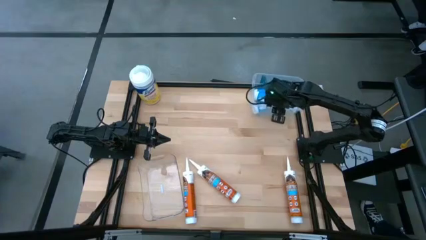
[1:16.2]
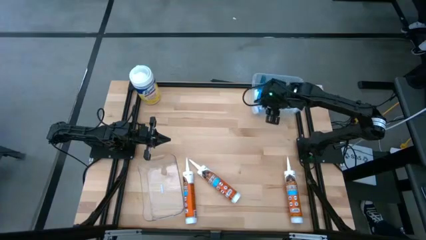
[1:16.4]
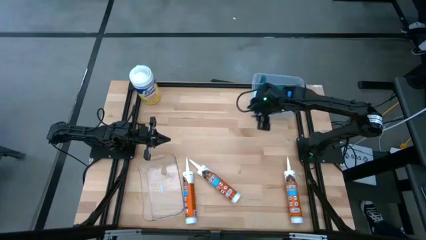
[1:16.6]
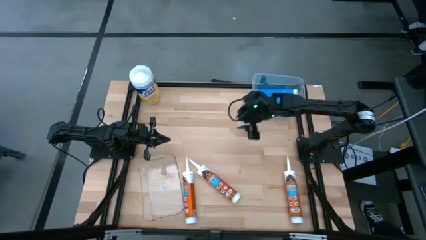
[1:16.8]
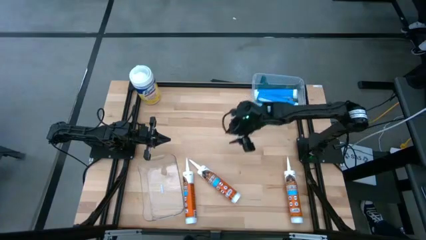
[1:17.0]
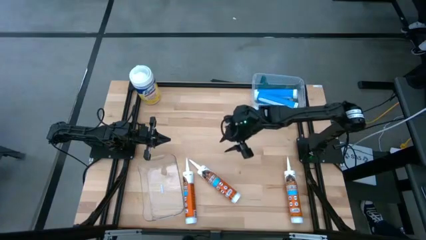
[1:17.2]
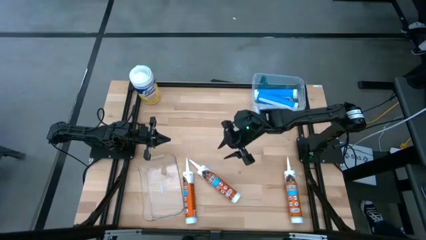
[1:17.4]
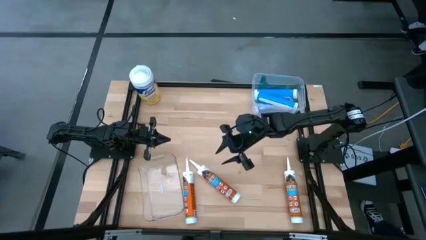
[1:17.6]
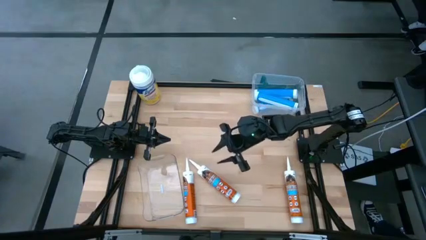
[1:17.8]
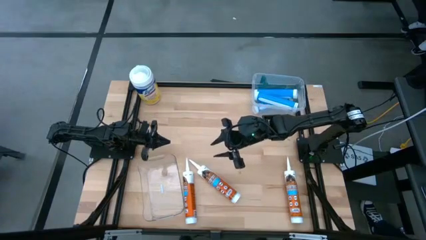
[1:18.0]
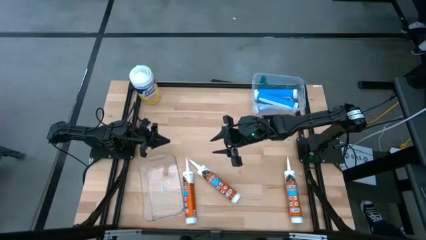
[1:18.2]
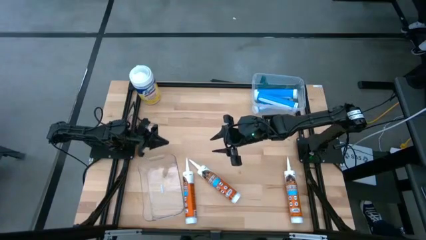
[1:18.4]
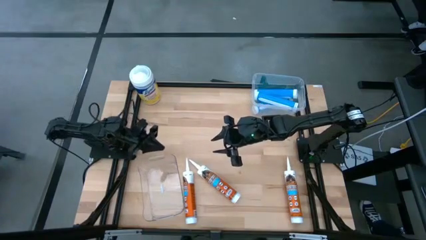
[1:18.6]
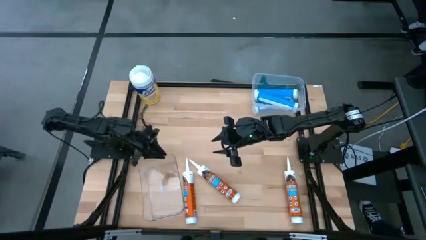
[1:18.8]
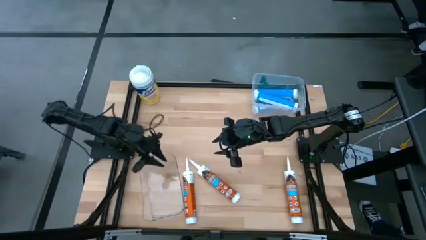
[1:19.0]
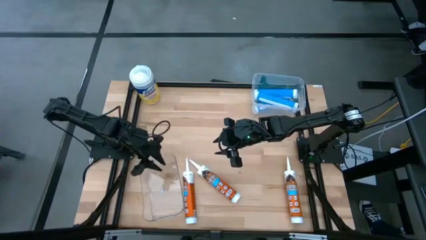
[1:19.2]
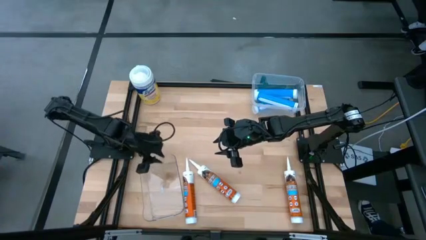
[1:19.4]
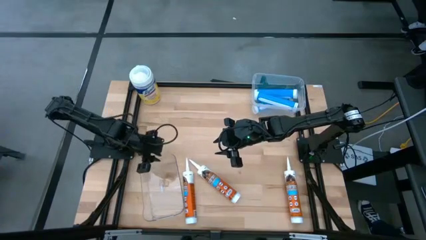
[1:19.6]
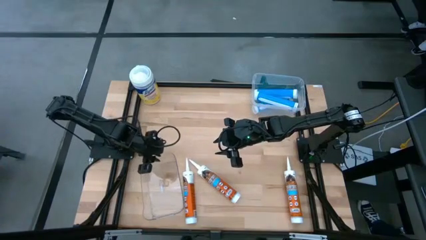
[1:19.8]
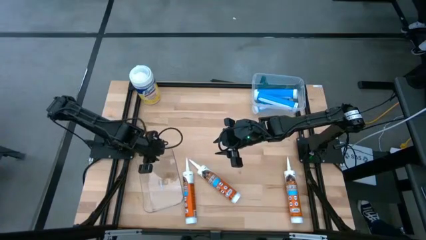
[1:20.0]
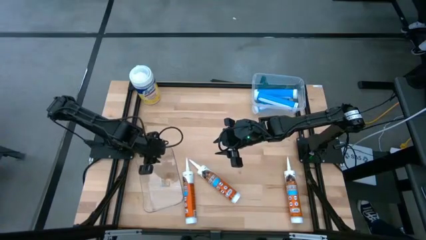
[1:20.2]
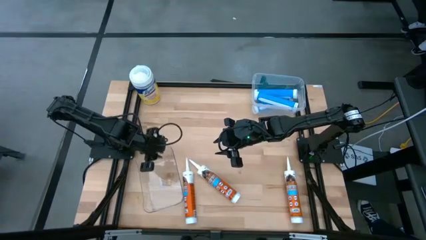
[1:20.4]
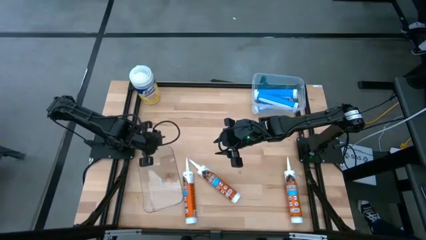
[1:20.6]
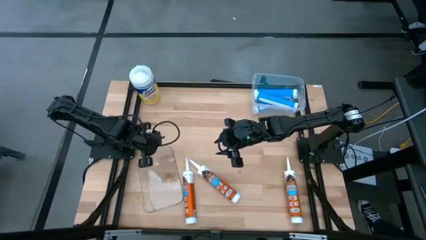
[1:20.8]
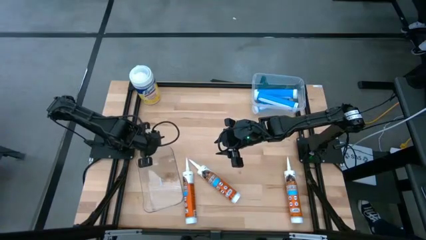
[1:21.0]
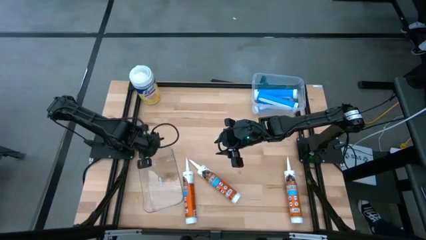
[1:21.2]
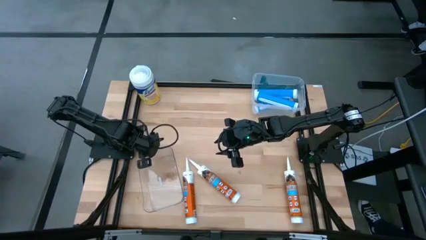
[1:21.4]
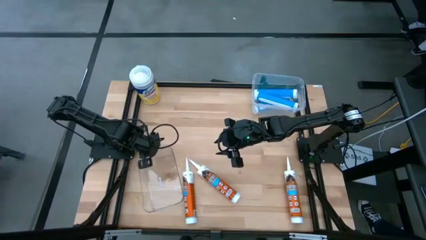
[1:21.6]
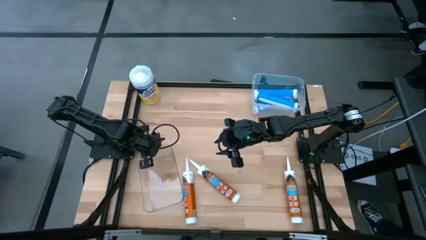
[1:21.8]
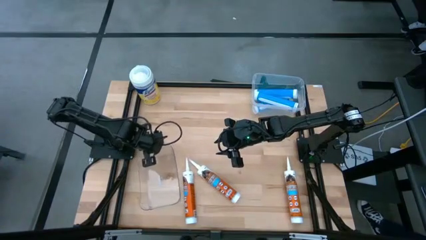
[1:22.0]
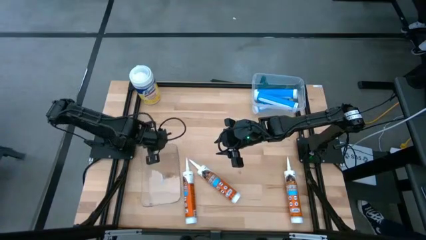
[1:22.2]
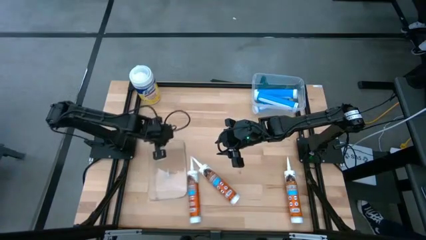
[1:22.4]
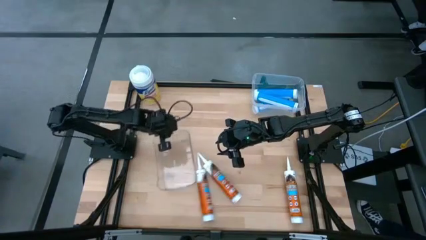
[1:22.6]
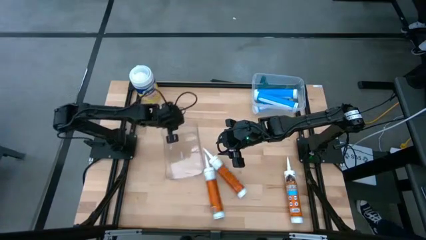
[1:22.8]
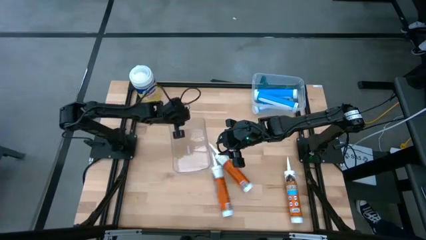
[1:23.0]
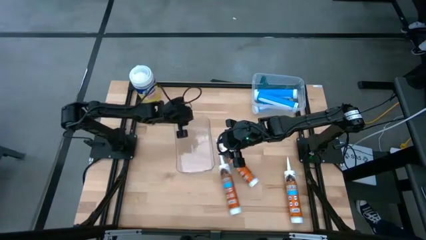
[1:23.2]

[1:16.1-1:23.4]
Task: Pick & place silicon tubes, Sealant and Lysol wipes
Move the transparent bin to the center of the table
